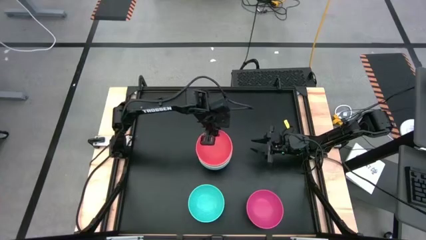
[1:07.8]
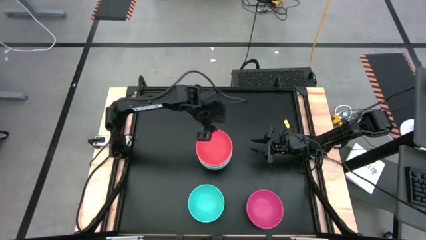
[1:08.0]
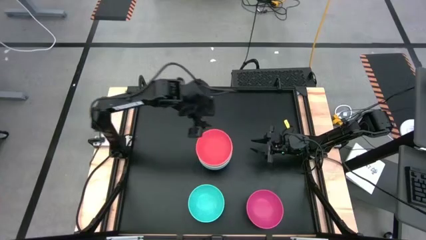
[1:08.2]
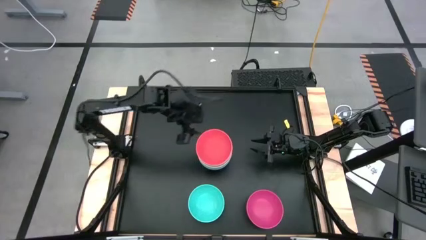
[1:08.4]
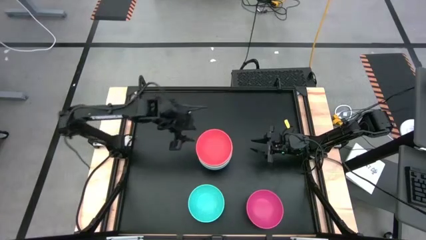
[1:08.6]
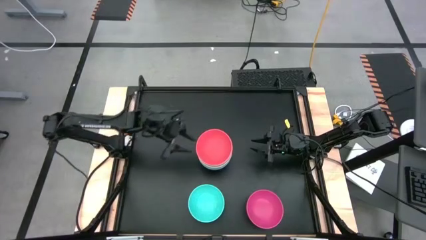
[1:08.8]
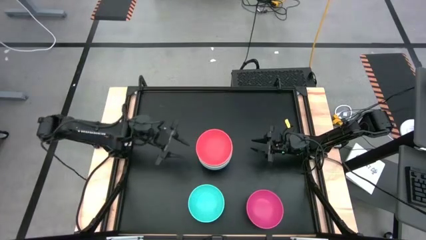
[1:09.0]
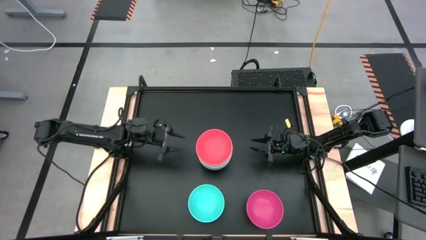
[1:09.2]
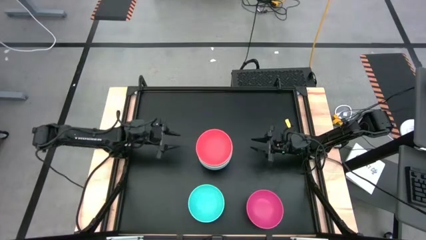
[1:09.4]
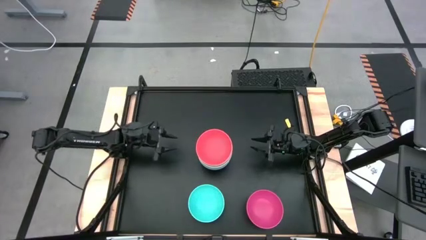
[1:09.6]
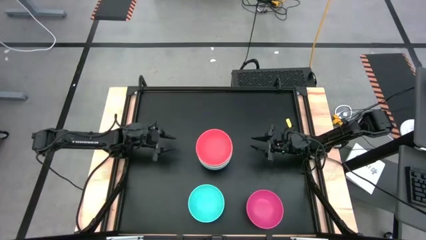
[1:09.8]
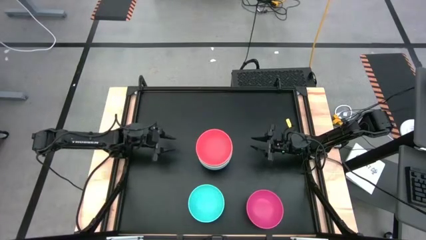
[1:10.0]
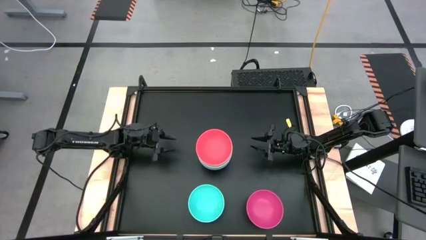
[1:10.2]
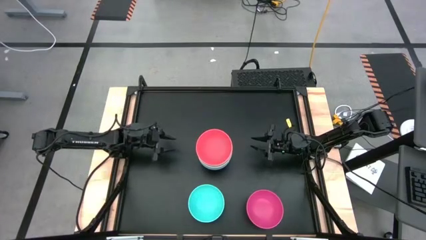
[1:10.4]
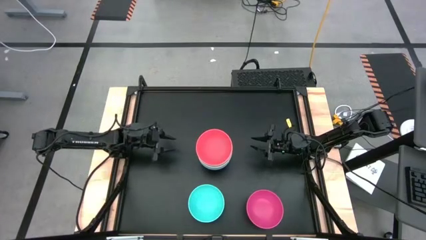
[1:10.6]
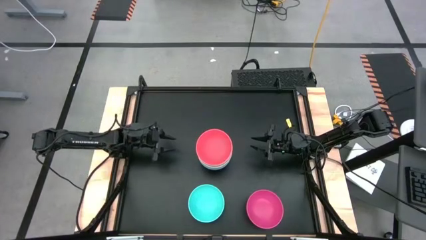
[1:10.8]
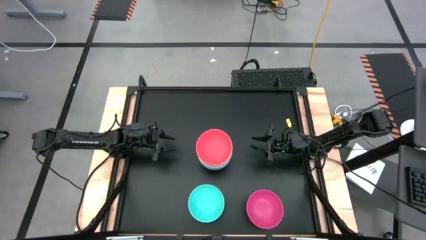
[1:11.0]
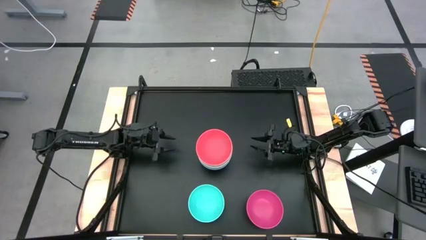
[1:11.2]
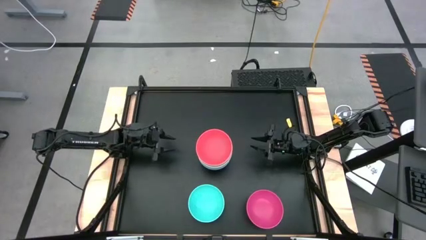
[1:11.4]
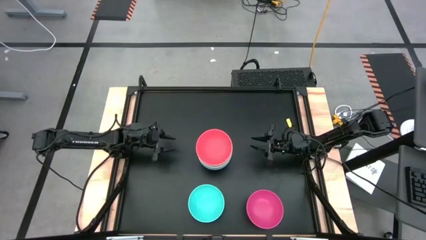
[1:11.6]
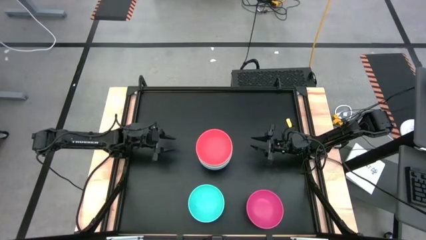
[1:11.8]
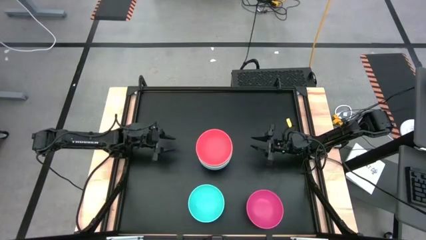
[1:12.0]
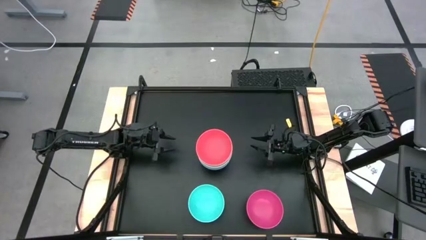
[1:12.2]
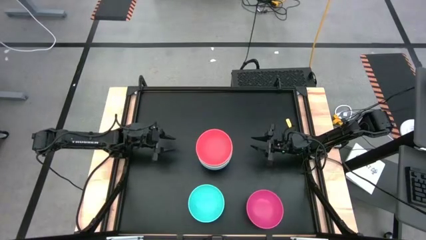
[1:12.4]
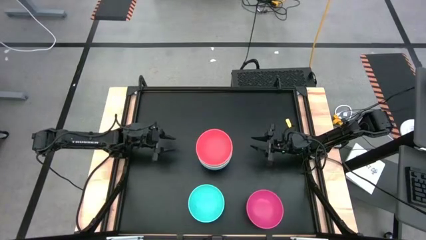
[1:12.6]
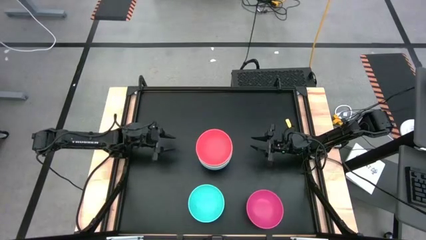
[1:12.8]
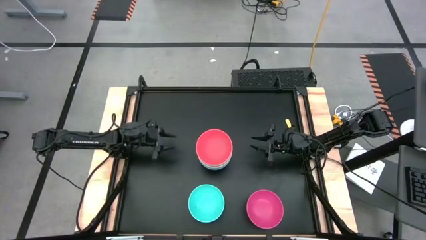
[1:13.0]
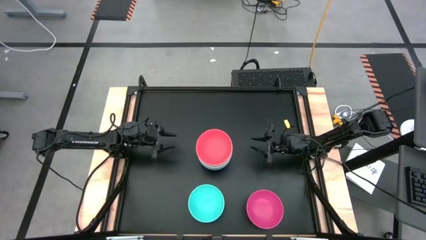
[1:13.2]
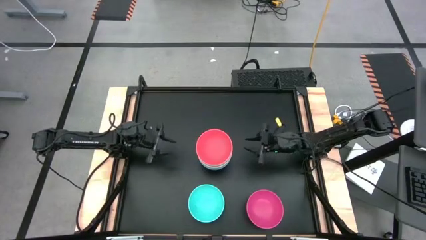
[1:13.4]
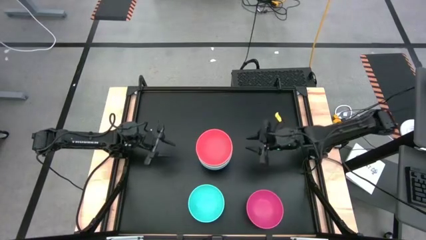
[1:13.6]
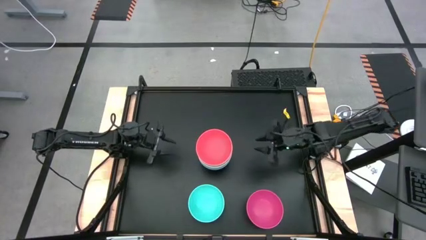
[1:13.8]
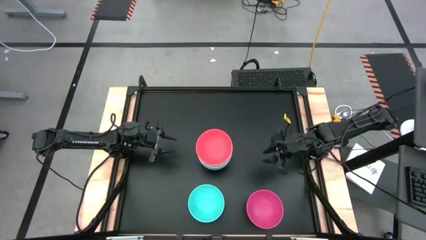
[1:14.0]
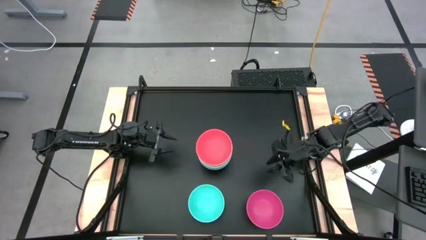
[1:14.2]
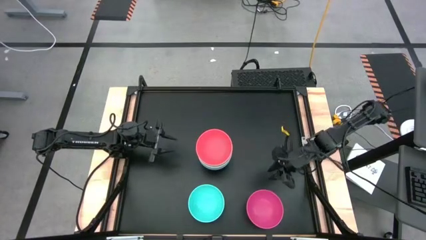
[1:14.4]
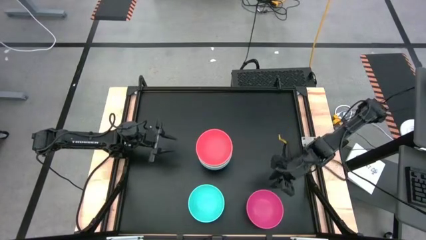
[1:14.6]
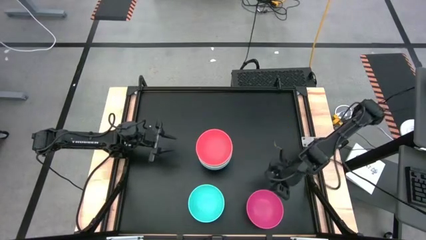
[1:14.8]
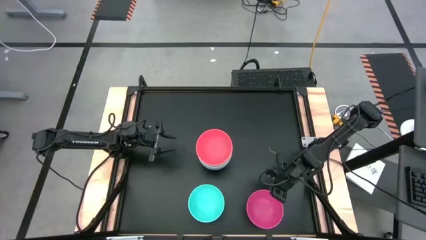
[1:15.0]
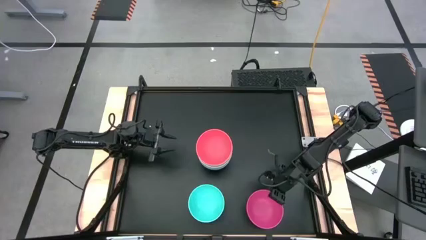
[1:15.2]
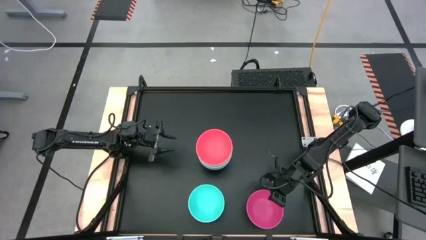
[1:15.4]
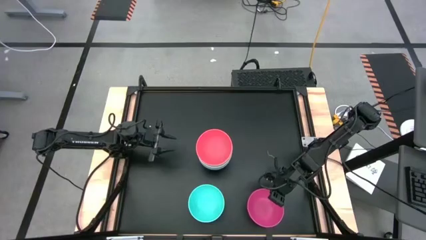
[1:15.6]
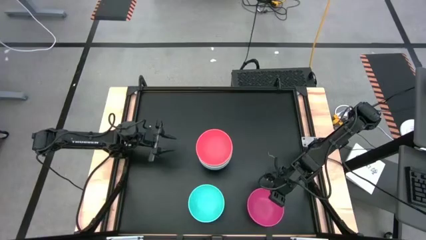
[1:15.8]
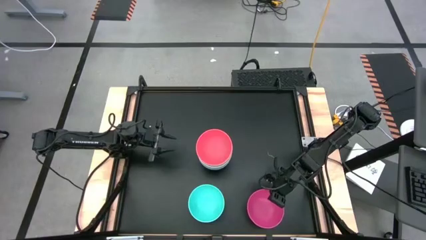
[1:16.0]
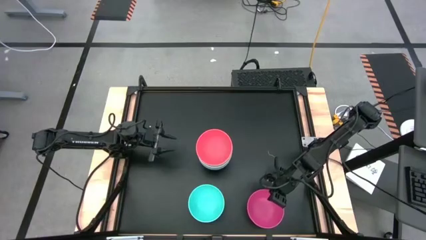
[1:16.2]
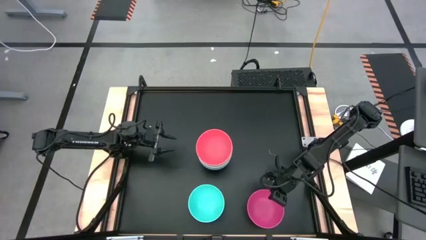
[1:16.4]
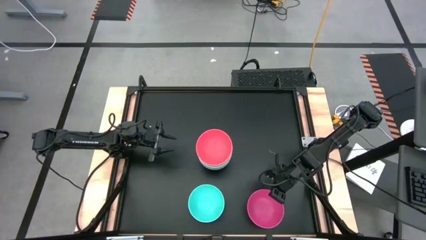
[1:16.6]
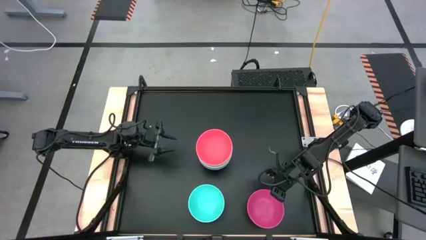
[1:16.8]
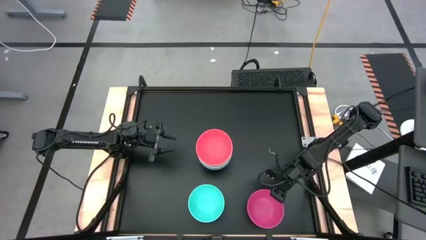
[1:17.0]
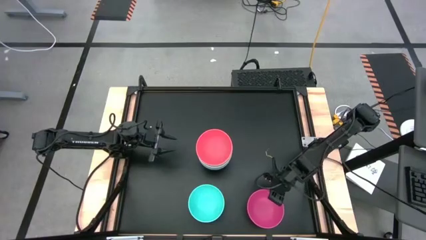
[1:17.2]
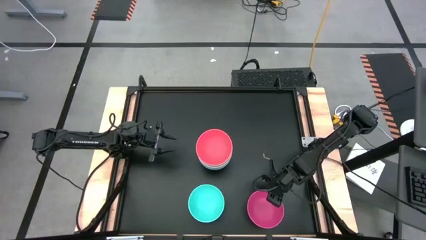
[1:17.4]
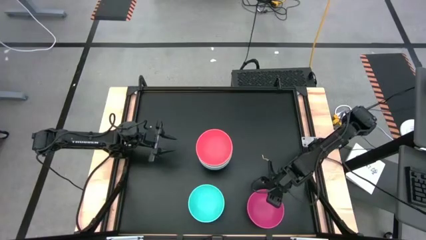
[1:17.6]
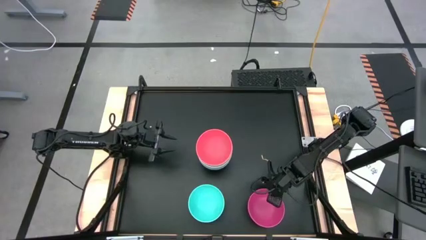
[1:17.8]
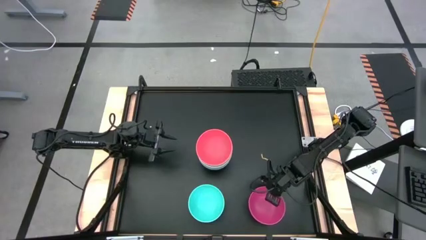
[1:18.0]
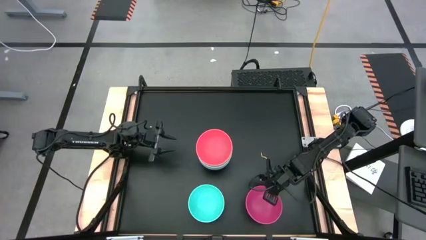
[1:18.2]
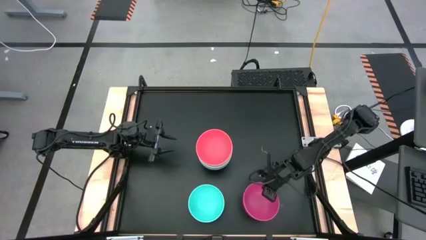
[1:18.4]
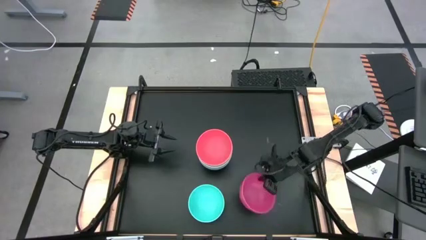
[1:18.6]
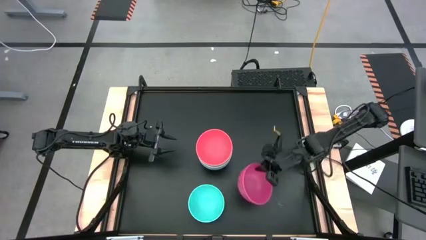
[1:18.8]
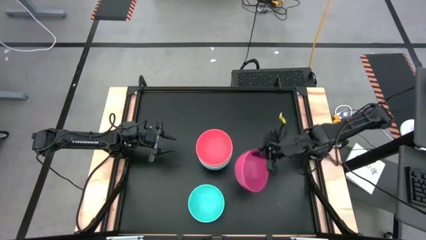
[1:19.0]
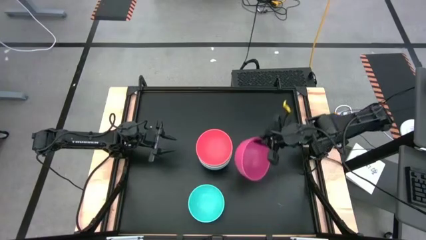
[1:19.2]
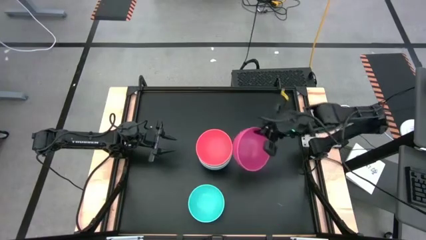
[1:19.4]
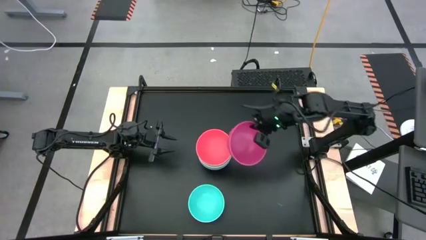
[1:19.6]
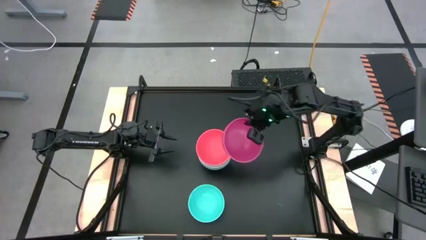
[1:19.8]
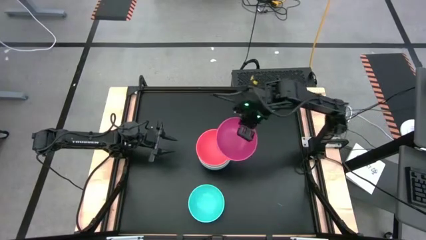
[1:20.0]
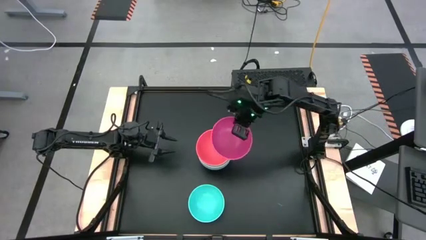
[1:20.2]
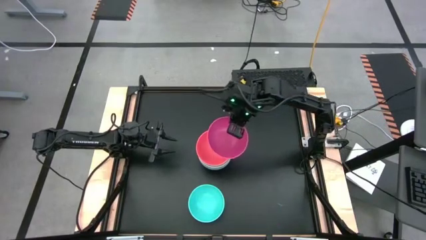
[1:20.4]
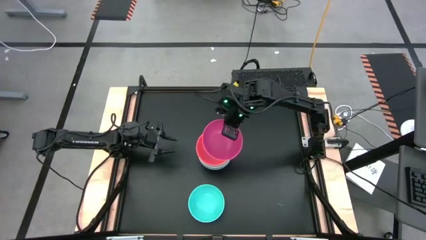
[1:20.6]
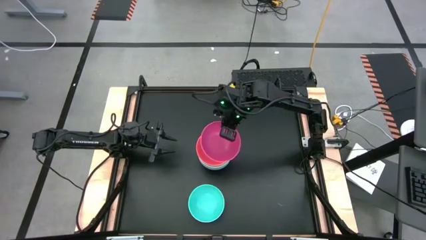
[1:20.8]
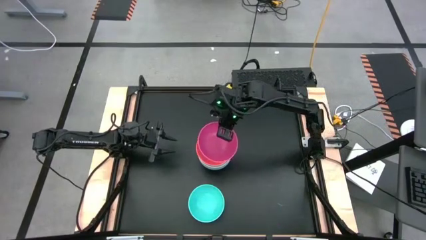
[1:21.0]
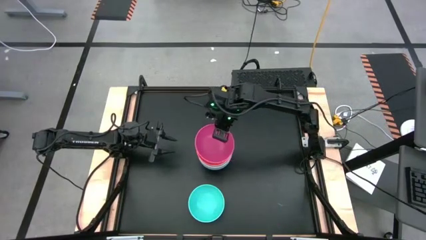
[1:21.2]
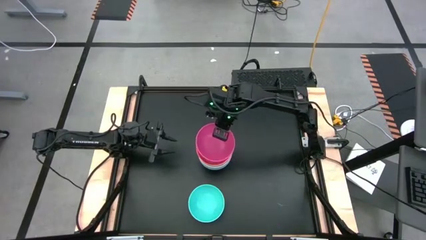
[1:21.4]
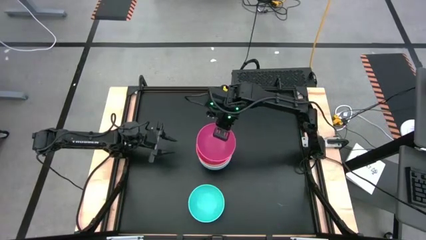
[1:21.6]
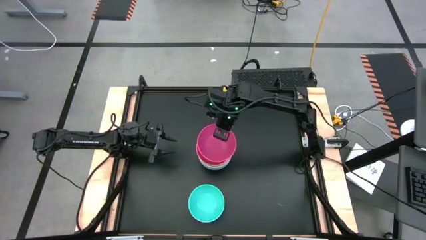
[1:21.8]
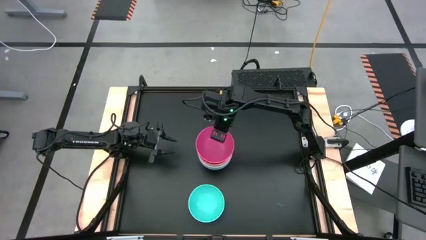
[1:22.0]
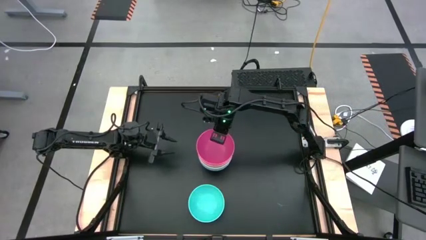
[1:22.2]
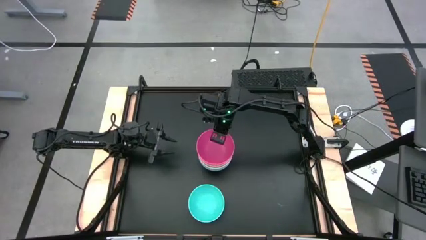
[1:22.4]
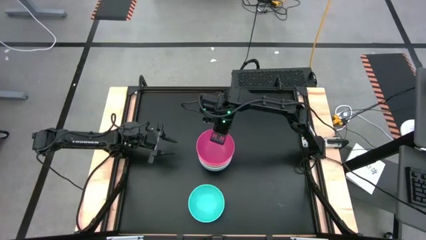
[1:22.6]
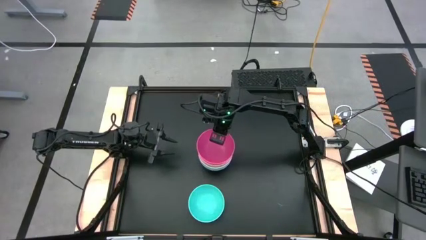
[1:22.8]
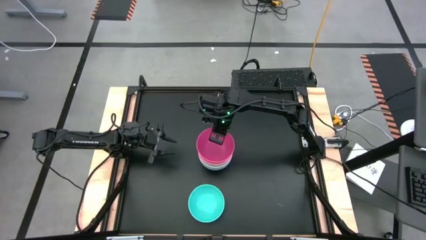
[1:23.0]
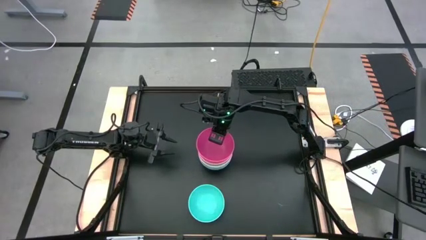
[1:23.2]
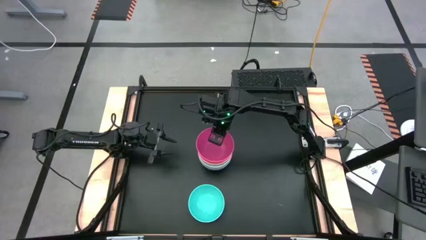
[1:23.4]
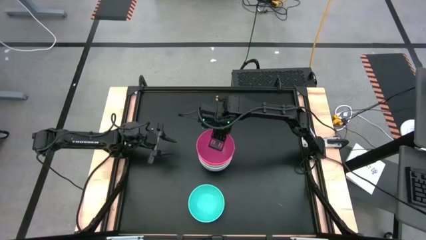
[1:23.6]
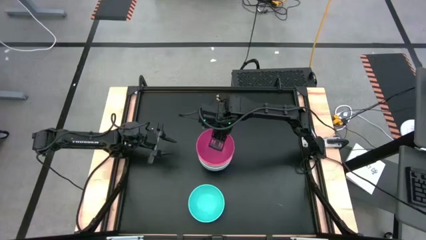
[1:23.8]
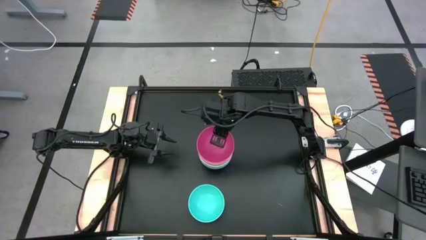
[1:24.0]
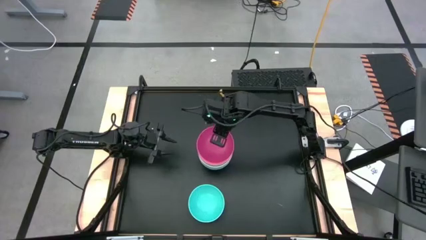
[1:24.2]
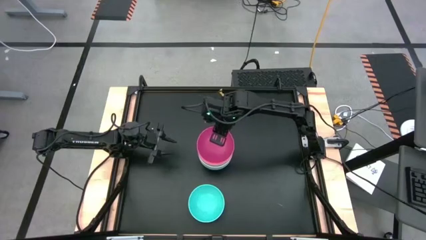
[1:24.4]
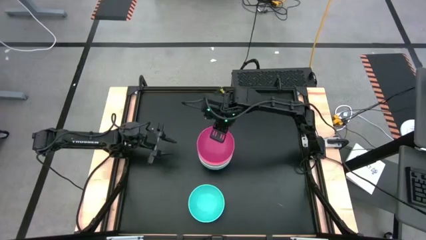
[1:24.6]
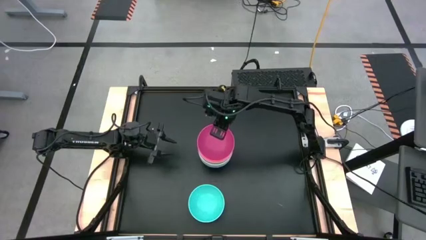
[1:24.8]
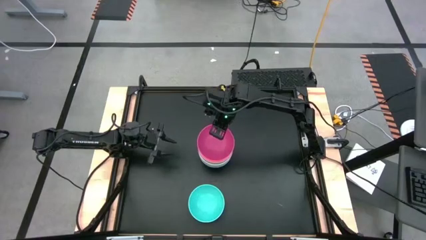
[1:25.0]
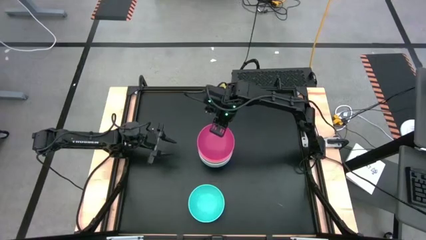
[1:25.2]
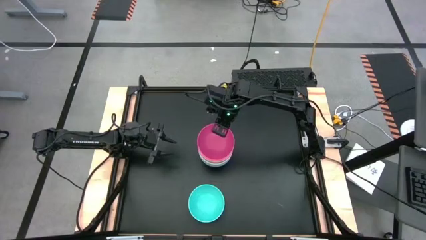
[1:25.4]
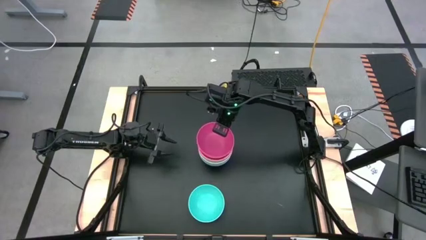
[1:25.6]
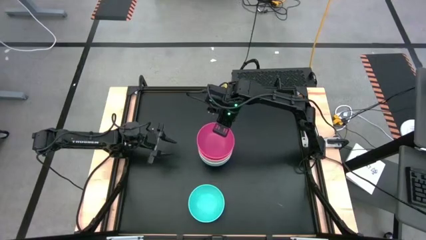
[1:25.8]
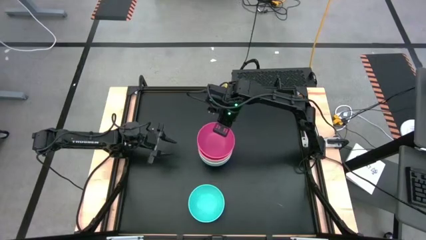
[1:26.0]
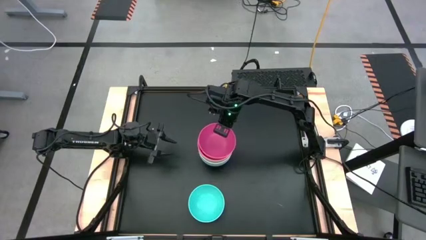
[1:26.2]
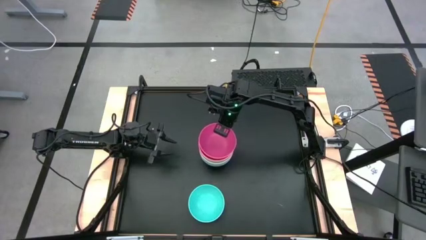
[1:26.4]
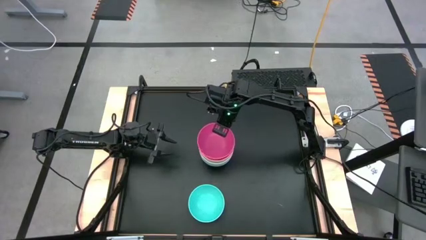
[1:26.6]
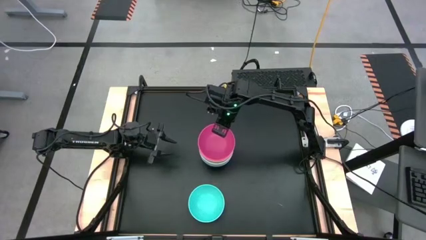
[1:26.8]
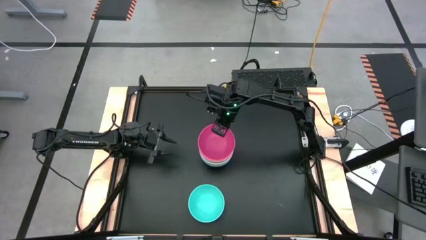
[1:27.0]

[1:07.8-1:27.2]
Task: Nest bowls inside each other
Stack the pink bowl on the red bowl
